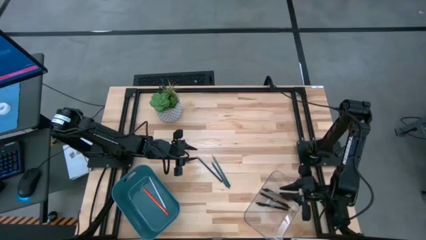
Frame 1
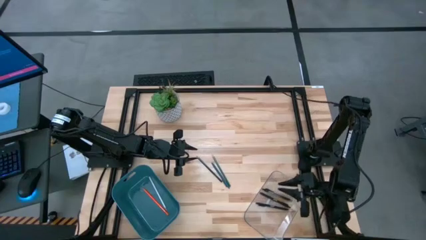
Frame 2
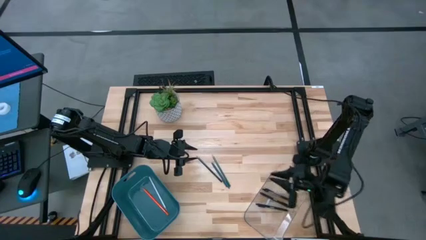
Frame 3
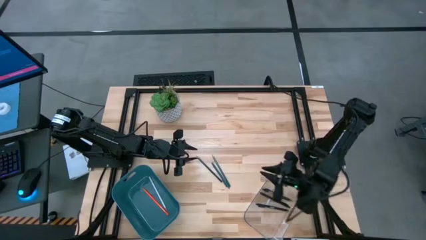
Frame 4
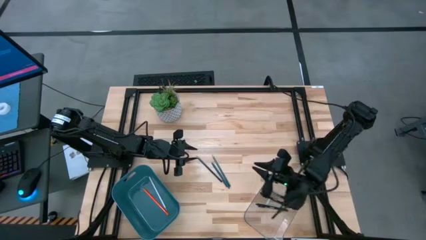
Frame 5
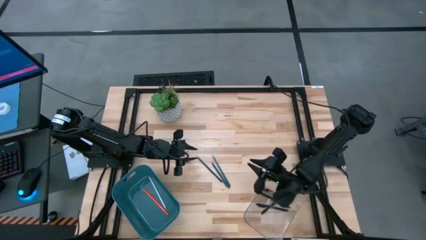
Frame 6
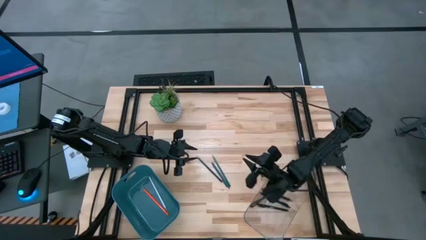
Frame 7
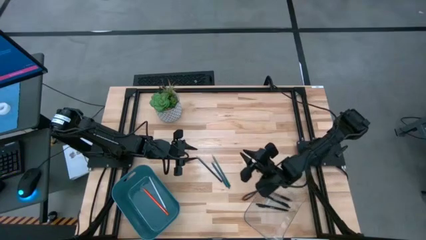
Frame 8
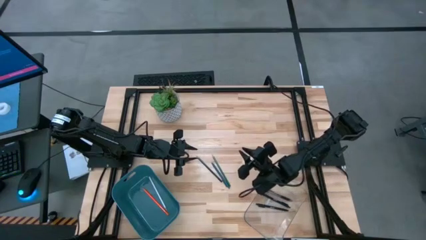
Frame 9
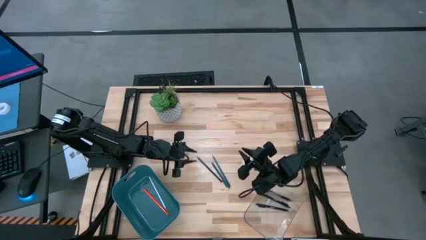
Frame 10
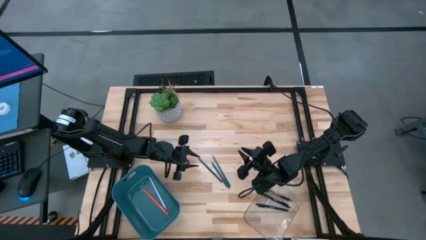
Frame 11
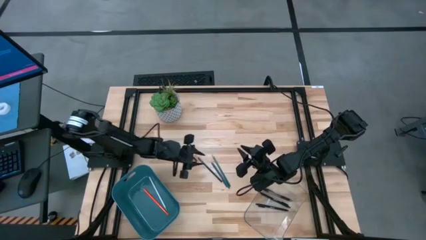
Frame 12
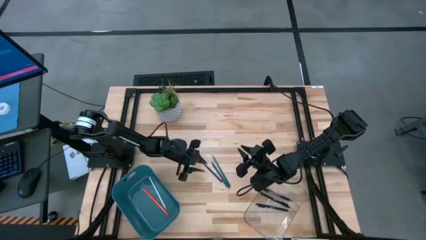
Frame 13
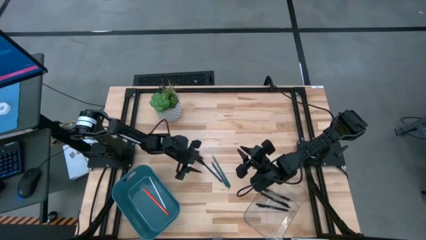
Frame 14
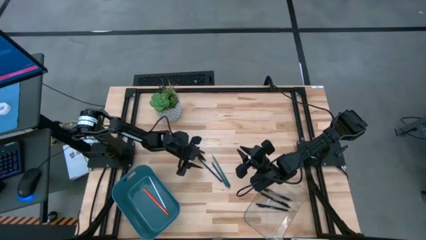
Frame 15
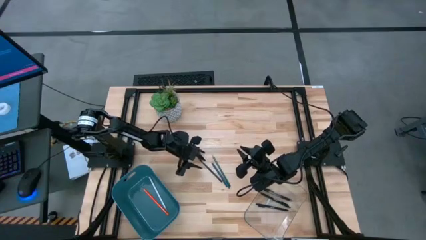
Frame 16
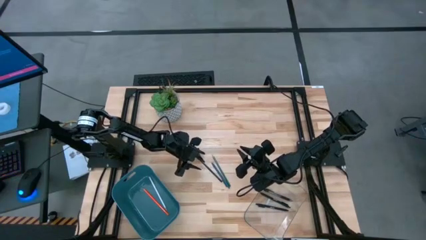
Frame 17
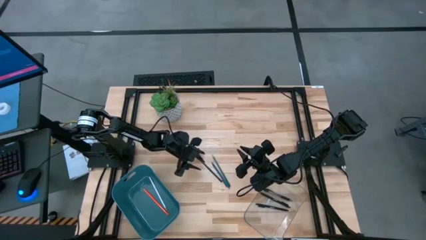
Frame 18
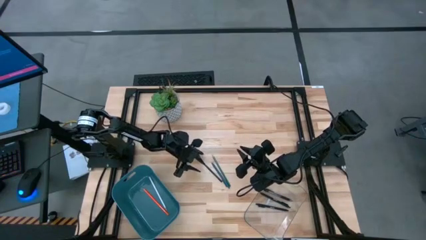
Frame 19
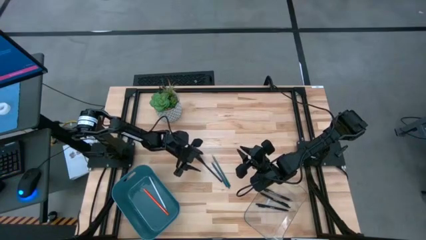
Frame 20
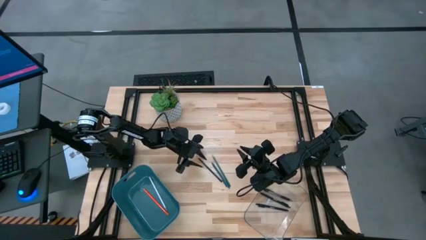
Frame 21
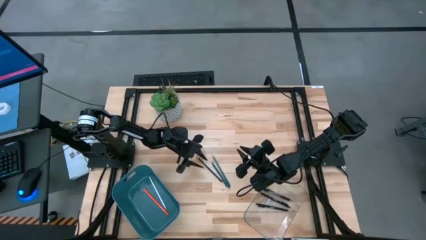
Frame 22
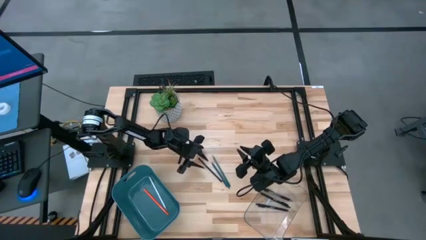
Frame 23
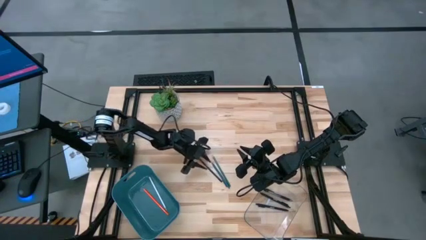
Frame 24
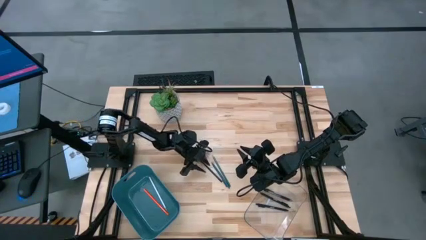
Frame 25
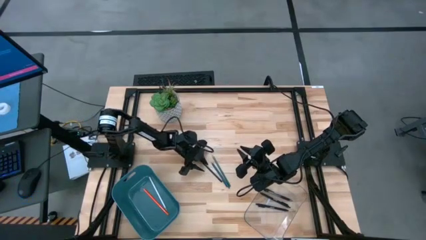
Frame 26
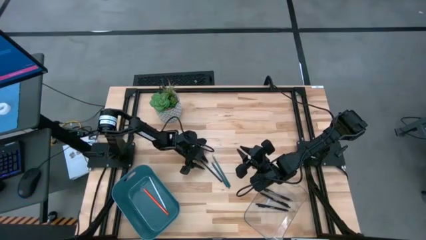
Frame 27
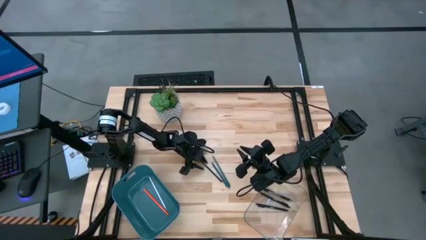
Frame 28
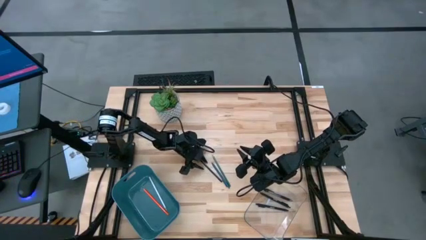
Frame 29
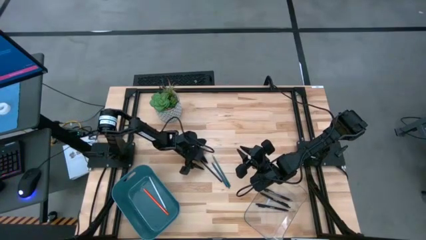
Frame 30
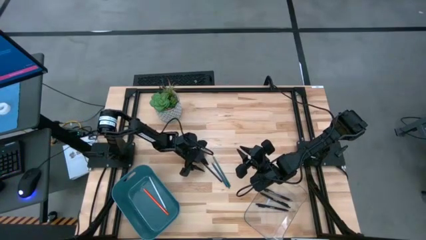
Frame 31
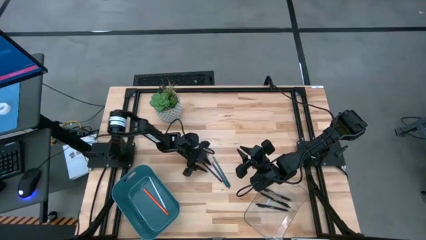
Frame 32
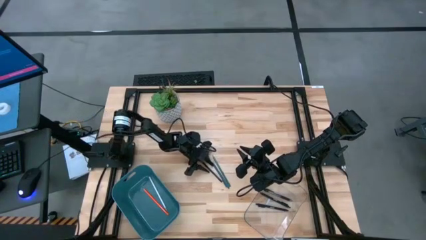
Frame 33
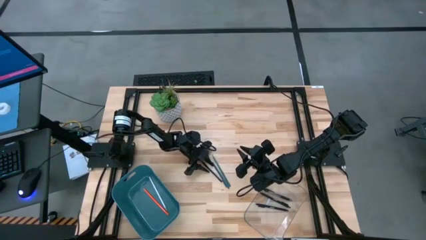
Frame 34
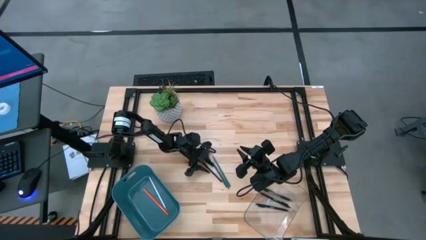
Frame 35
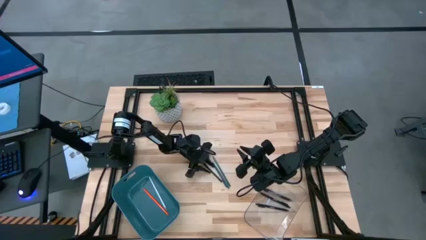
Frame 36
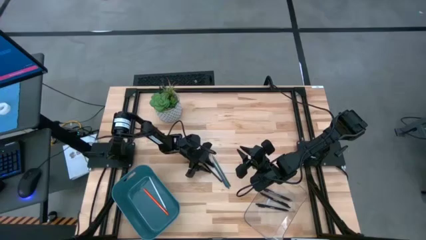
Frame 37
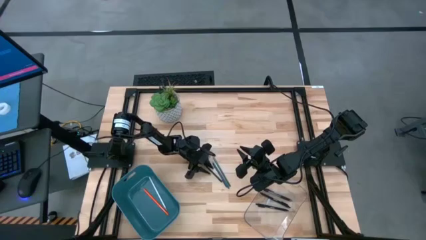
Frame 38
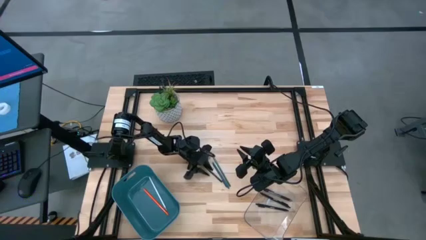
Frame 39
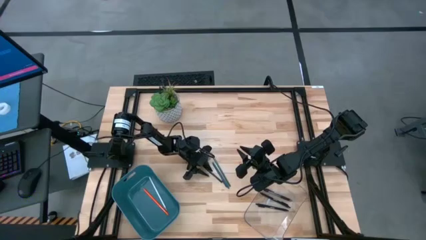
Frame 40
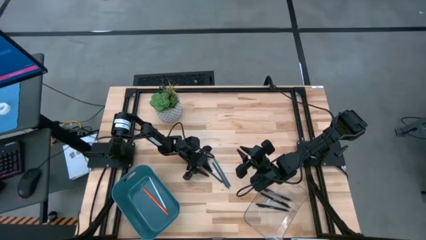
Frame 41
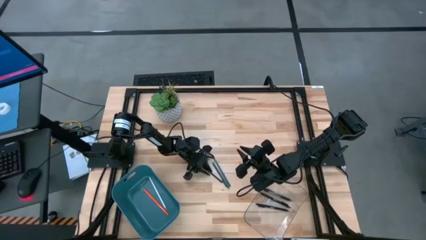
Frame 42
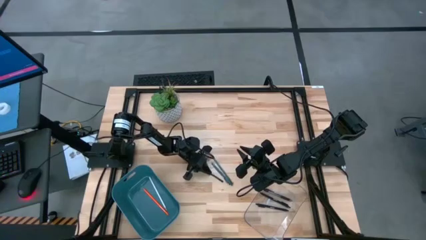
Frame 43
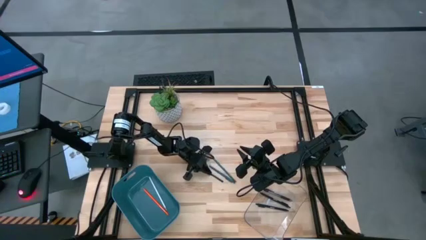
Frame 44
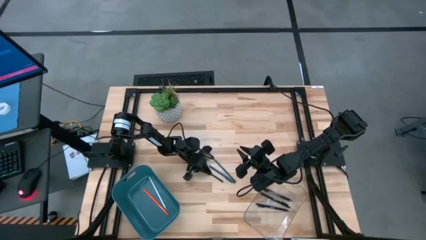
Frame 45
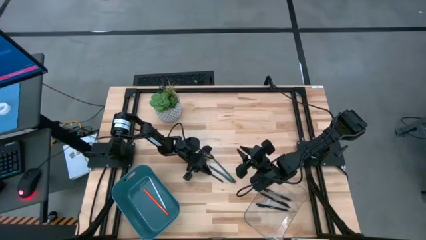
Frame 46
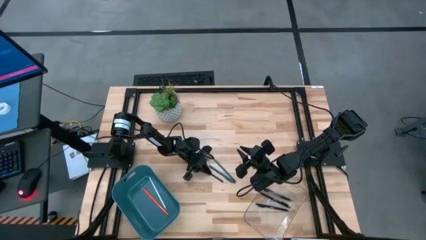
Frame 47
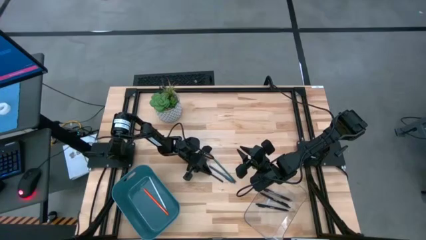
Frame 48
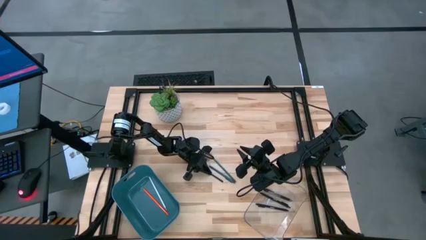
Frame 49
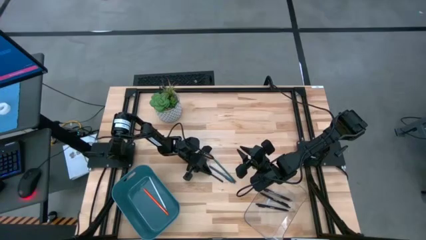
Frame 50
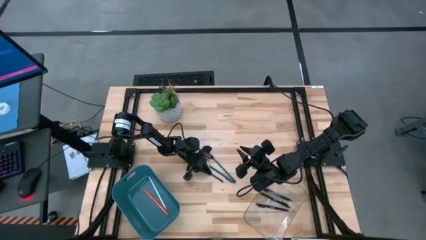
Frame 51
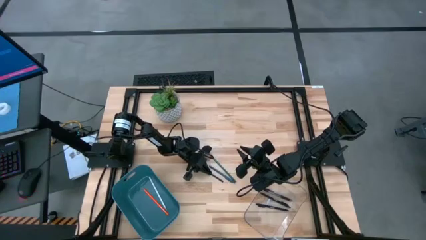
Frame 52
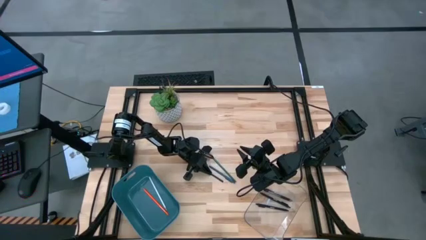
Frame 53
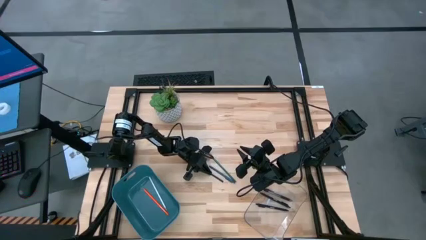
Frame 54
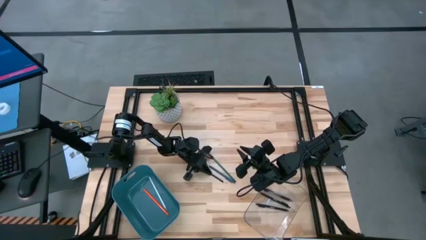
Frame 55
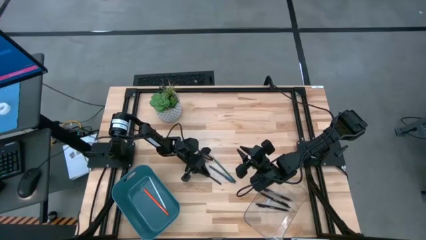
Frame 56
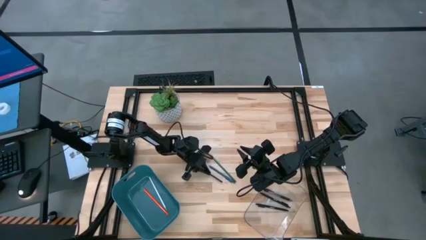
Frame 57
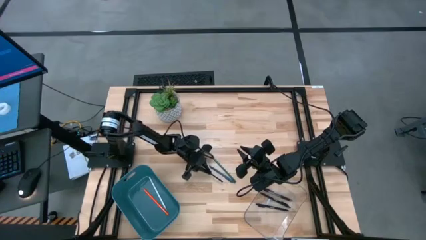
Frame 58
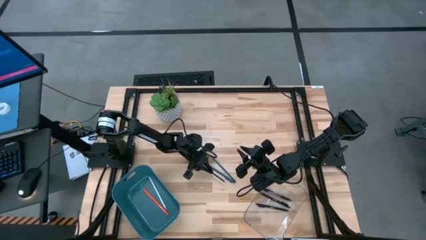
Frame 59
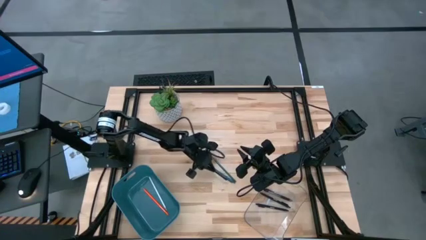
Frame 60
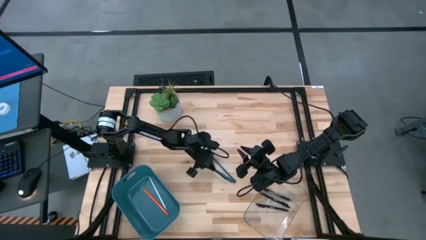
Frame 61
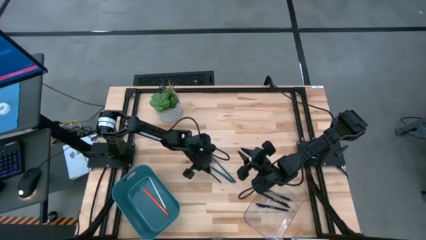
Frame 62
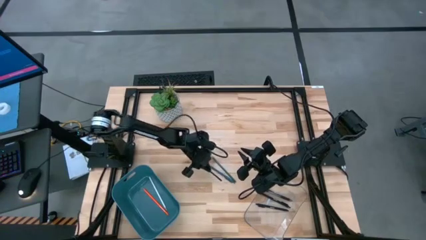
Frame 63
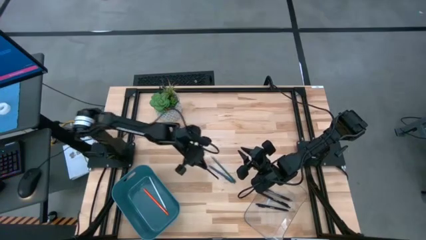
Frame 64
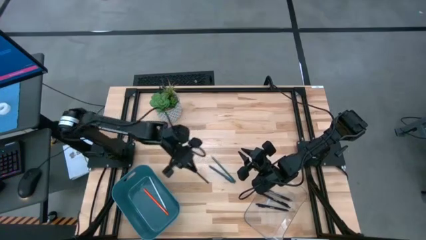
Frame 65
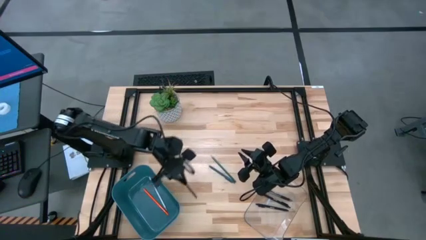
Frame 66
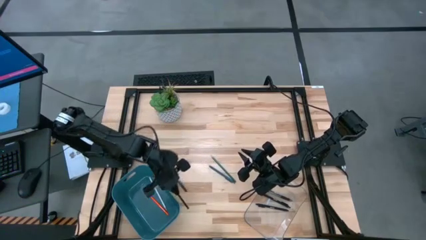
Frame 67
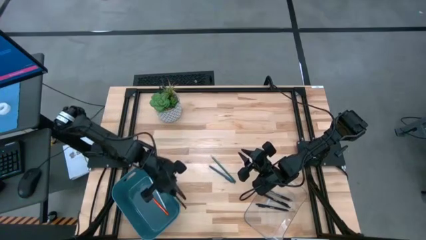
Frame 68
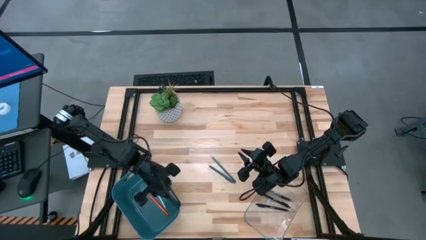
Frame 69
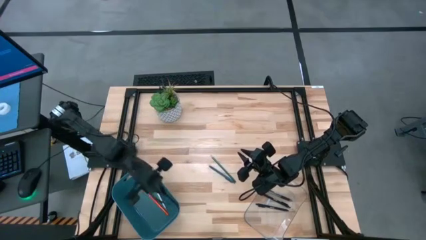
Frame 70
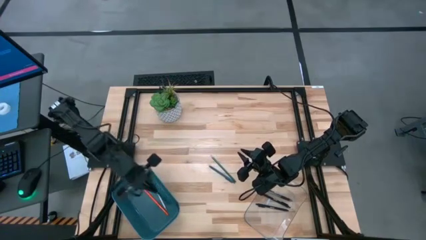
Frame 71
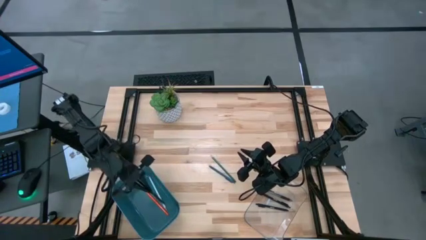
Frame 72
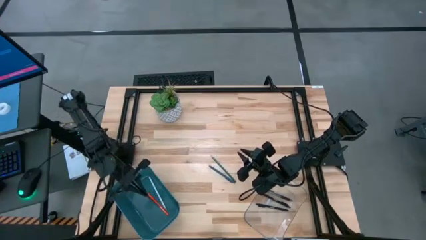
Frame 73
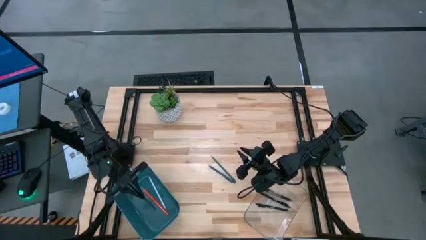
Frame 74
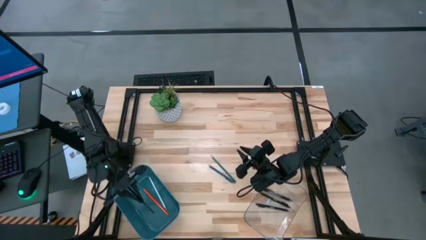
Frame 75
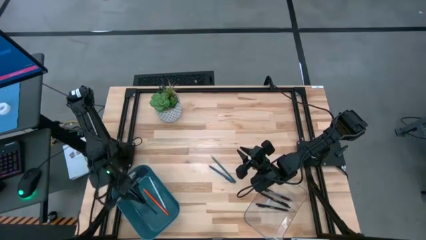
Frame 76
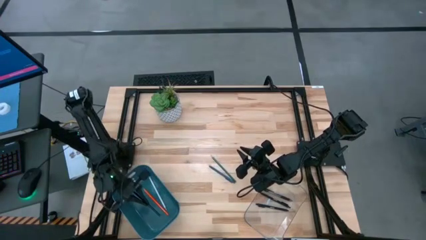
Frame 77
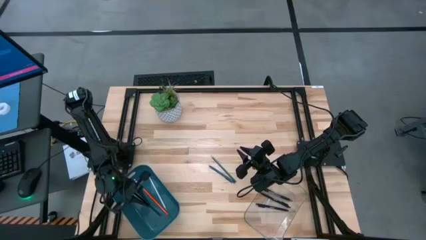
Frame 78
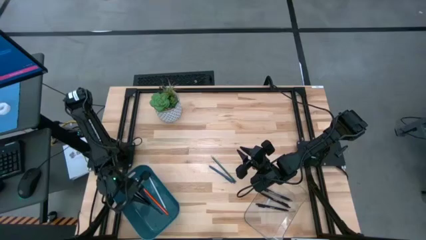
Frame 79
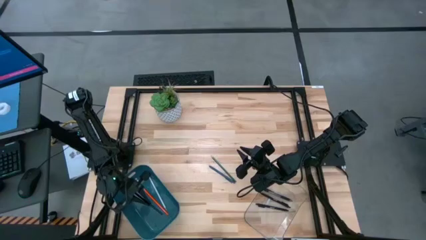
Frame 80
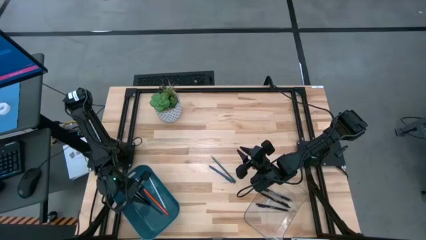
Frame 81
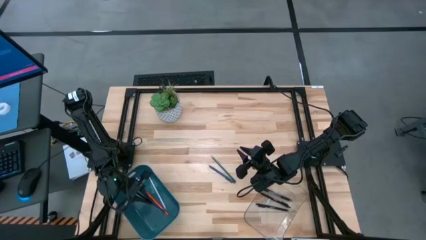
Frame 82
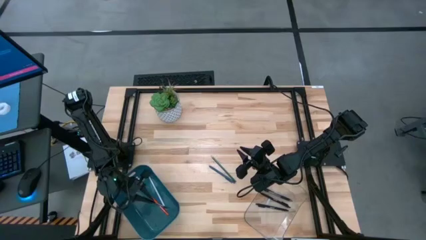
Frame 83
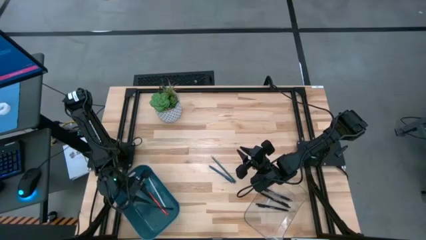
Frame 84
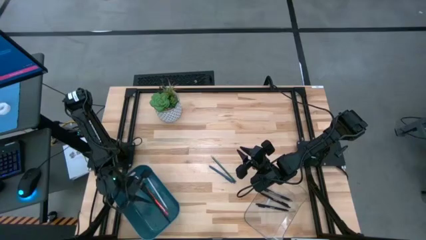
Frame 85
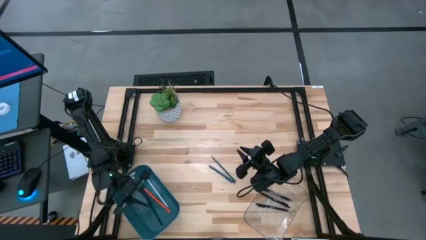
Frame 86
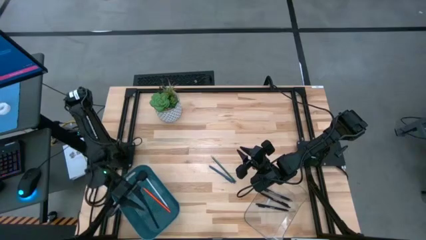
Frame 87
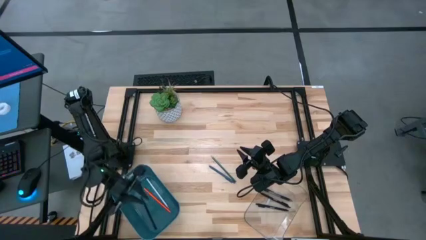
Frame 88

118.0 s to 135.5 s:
Task: Sort pens & pencils
Put the black pencil into the blue bin
